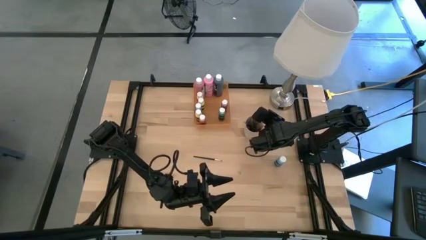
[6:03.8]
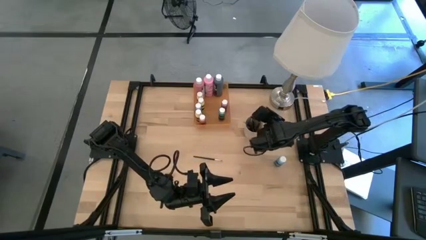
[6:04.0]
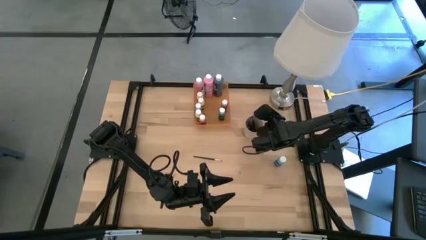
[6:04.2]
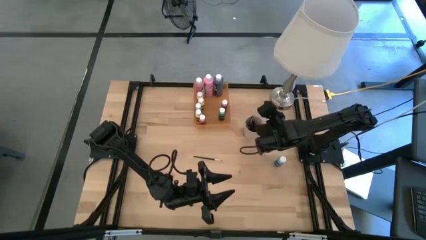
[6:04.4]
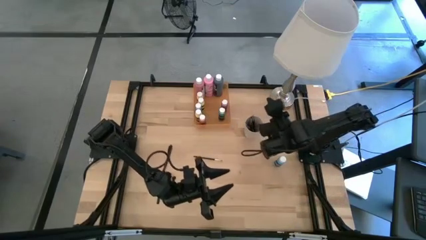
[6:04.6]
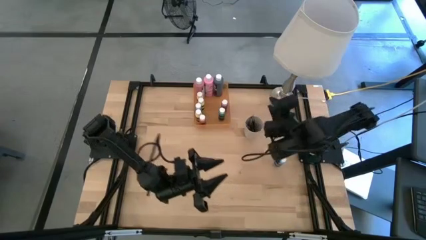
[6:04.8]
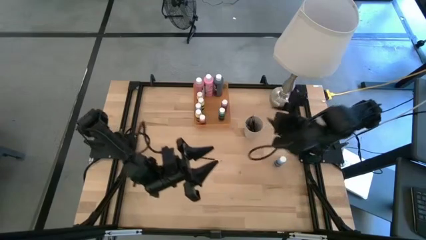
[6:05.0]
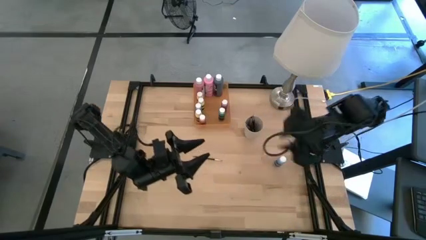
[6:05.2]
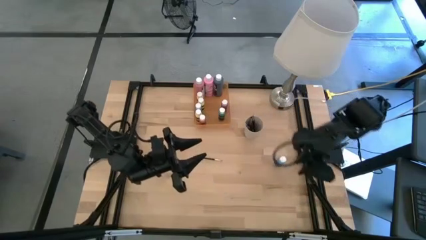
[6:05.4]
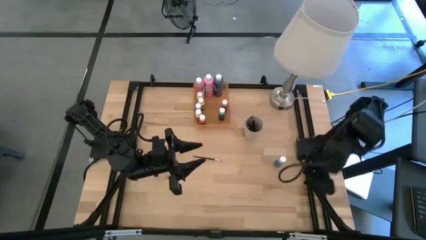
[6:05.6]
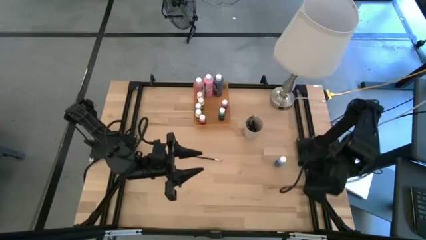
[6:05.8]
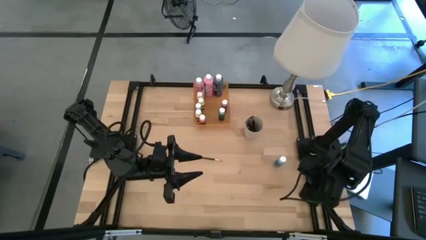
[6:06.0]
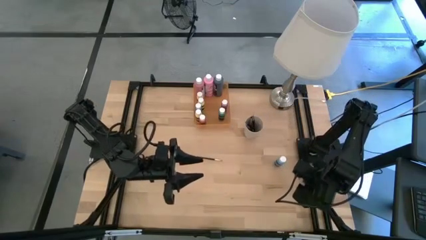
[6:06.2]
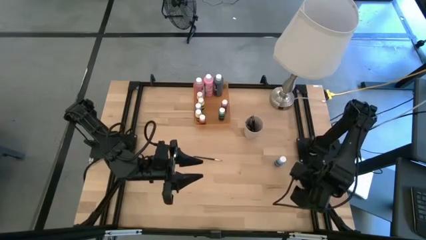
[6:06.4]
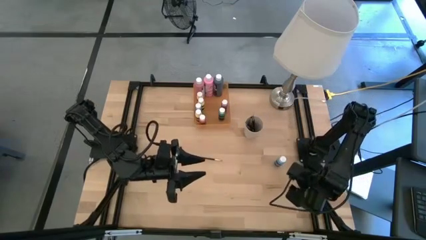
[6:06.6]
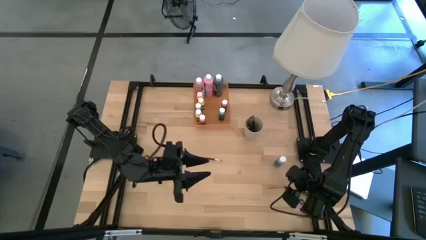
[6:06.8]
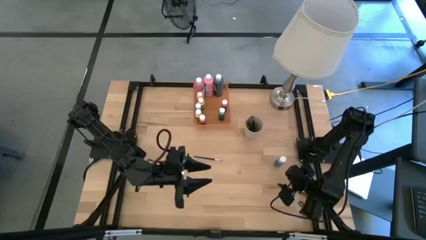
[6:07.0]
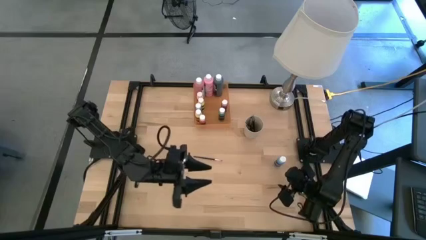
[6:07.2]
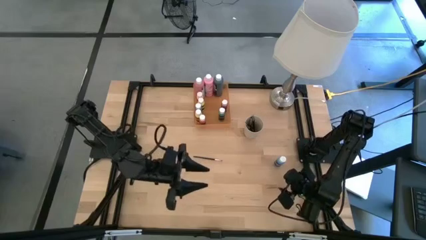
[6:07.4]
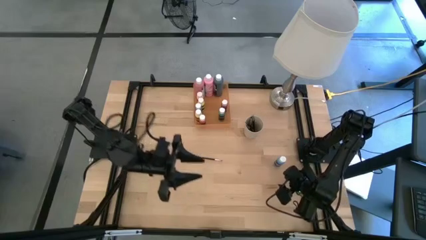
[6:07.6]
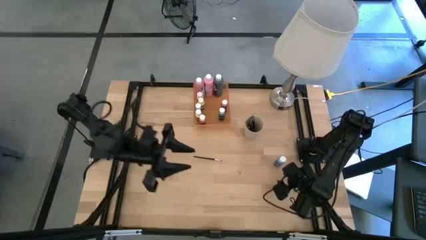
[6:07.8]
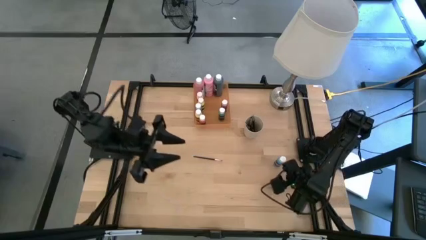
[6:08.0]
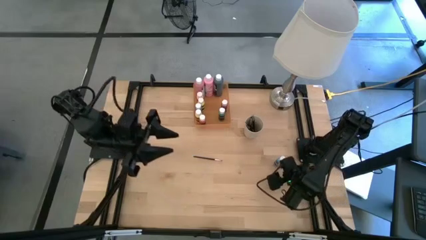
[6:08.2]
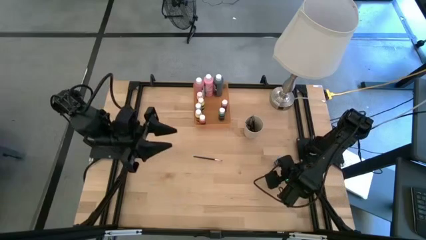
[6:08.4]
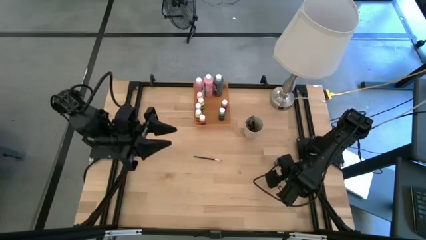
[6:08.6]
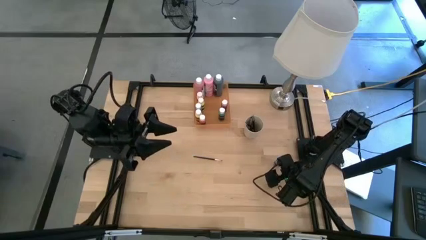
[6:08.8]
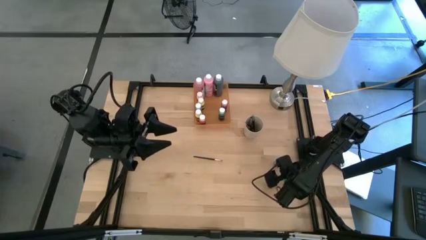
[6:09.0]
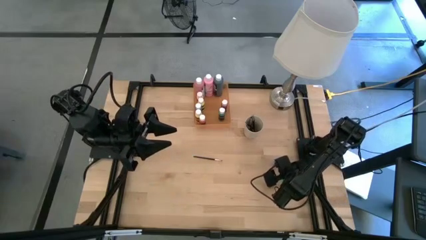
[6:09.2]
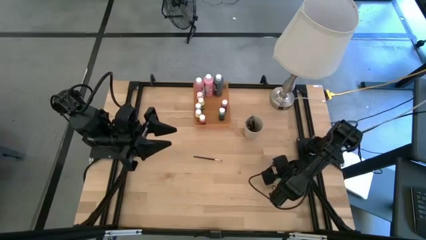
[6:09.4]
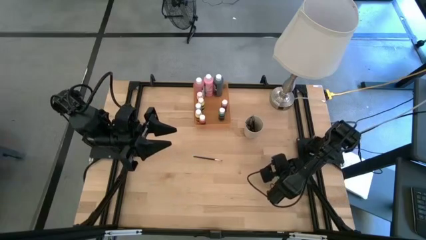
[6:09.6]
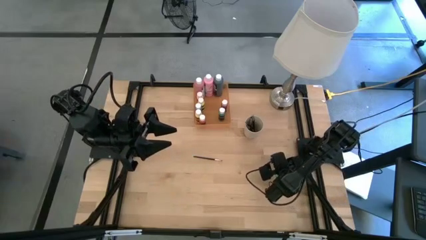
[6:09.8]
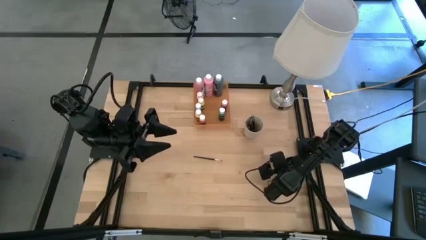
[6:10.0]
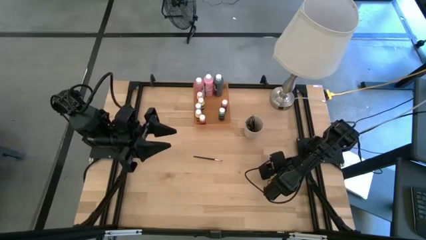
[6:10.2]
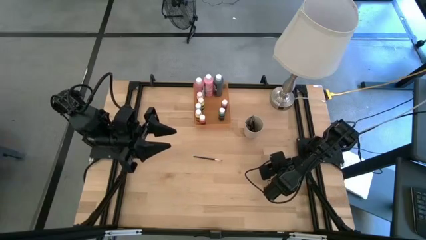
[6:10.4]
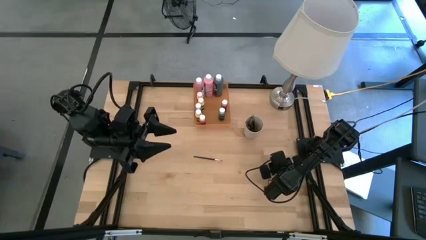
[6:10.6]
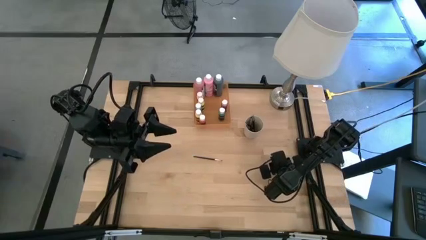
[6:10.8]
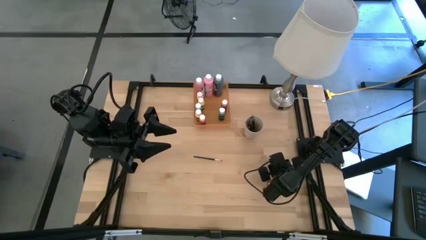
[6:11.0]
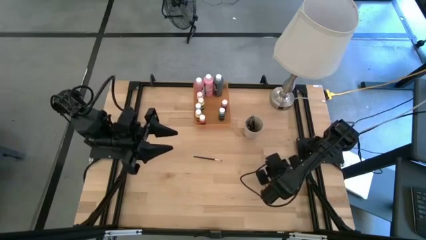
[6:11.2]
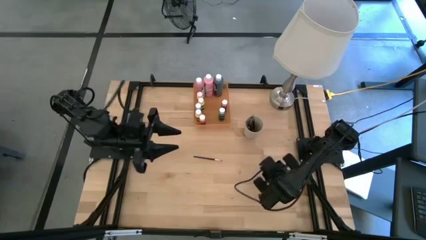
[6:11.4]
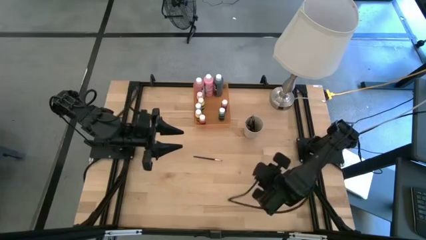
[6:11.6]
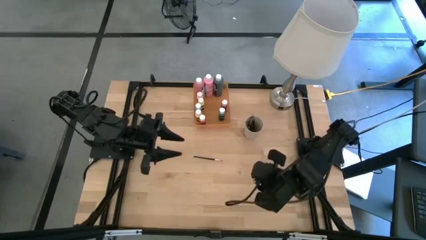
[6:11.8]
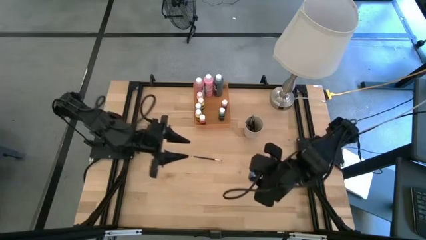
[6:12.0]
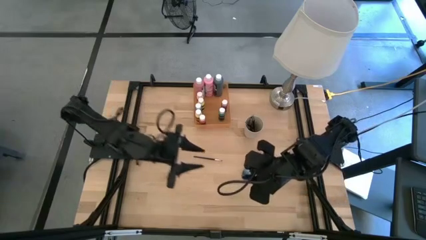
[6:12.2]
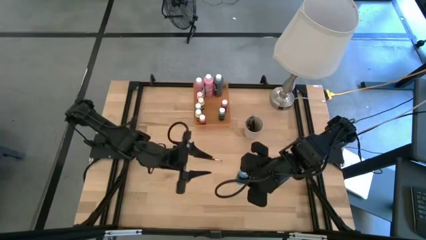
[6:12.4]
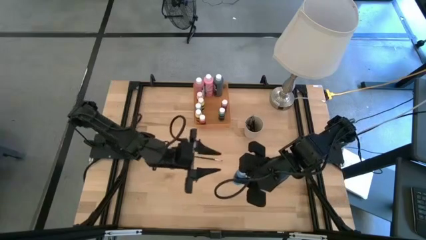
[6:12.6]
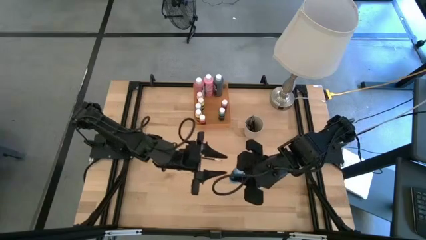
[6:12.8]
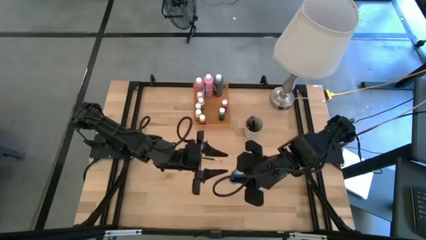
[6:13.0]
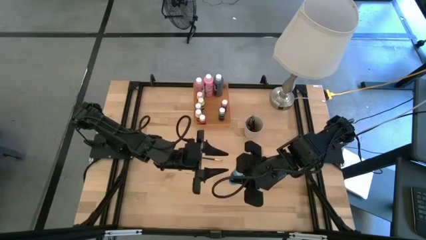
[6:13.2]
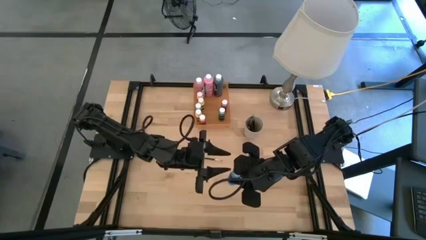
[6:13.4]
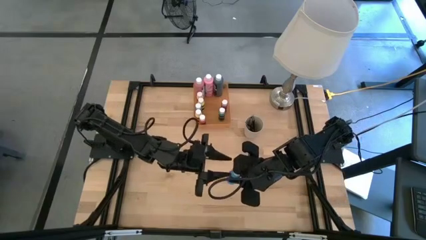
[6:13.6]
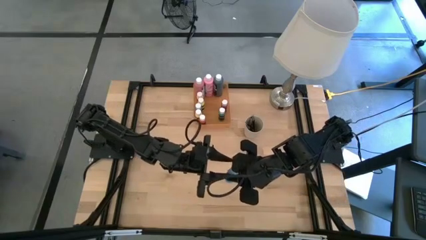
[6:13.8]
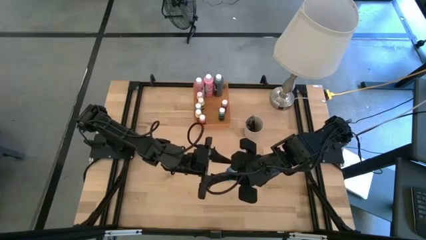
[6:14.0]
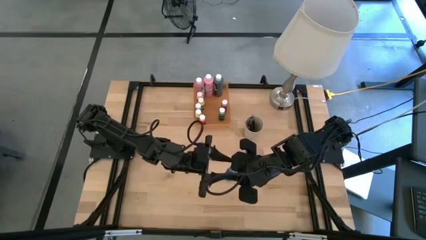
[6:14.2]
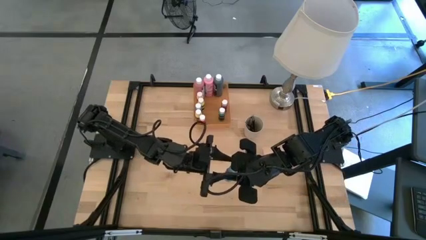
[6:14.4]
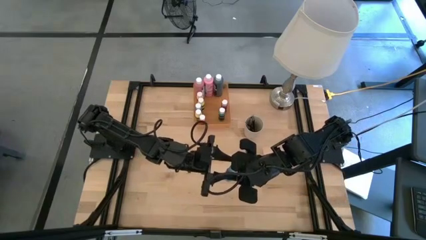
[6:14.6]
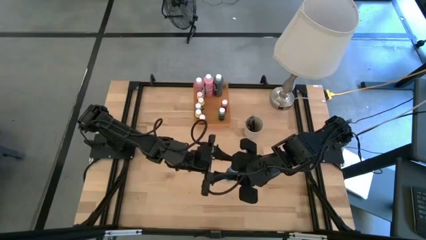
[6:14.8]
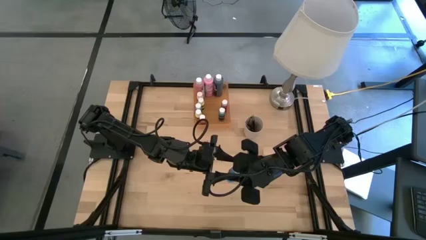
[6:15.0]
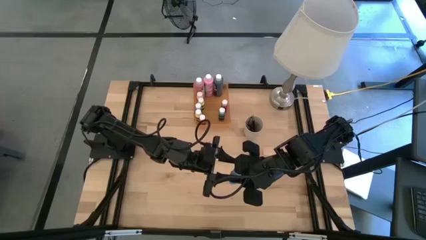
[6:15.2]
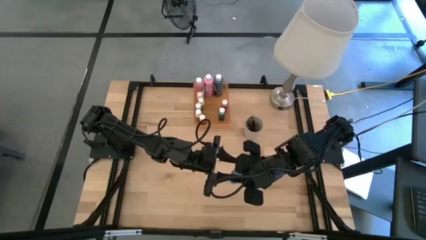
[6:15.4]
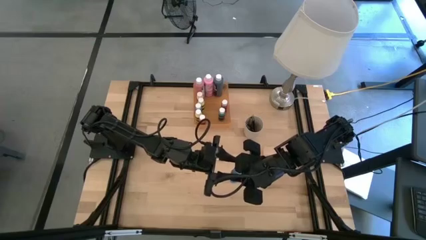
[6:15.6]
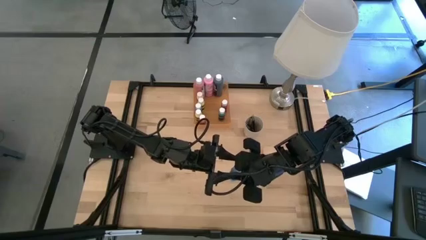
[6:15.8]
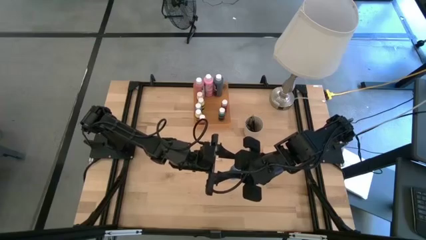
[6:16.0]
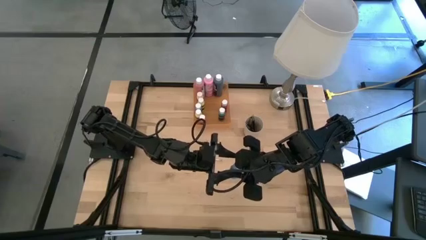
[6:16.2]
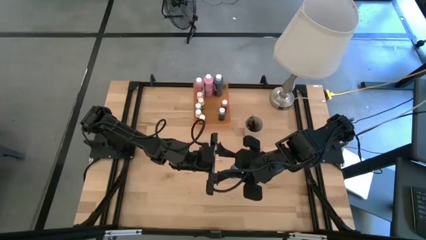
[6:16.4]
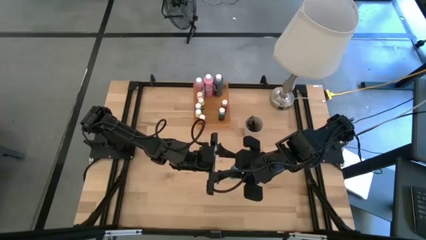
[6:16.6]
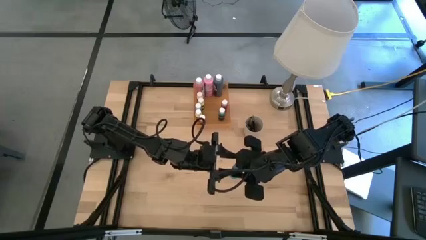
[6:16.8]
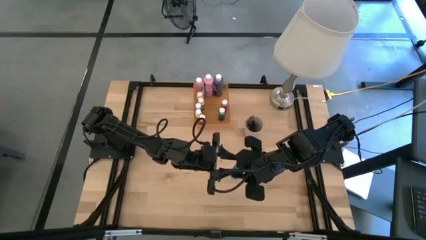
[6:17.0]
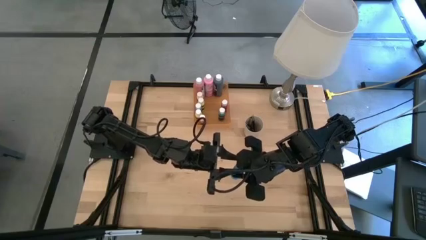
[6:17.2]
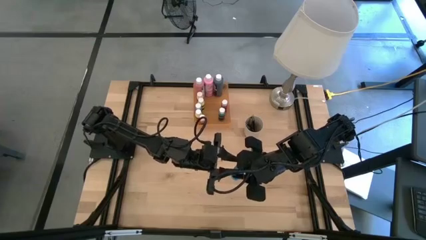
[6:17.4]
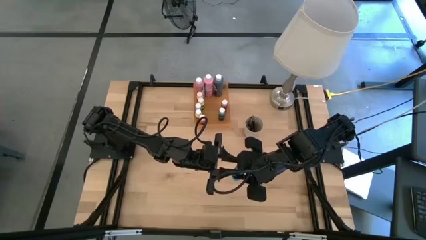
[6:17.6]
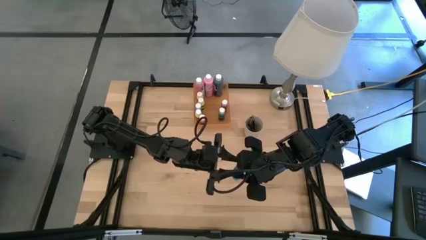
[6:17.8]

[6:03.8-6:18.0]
Task: Pick & Place Paint Supplies
Put the blue paint bottle into the orange bin

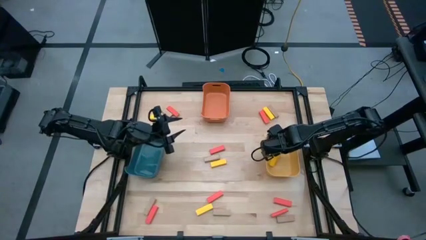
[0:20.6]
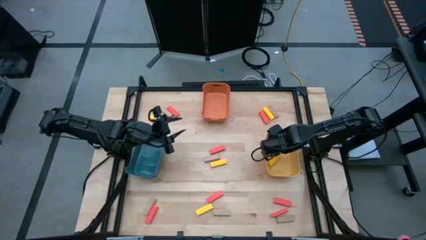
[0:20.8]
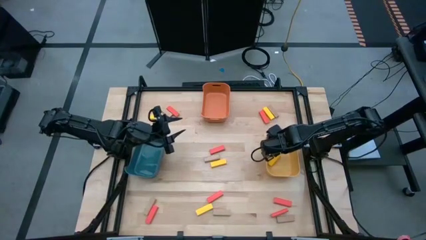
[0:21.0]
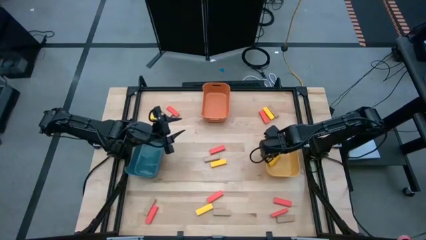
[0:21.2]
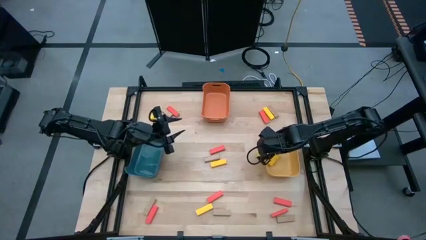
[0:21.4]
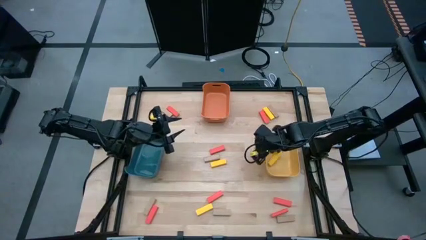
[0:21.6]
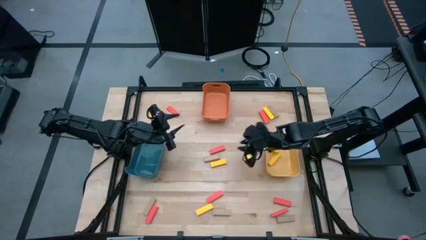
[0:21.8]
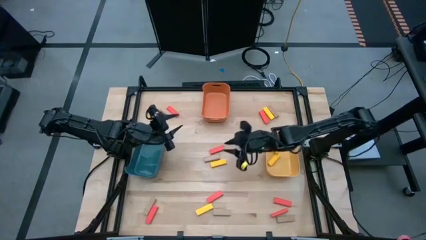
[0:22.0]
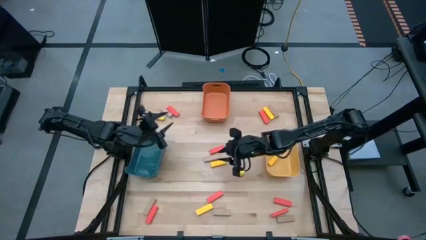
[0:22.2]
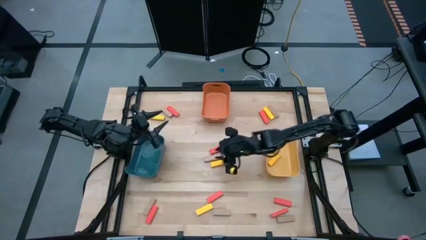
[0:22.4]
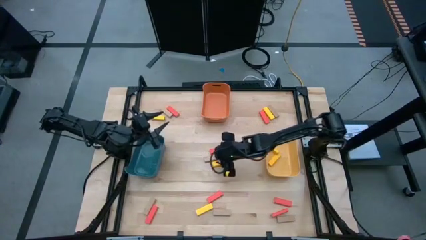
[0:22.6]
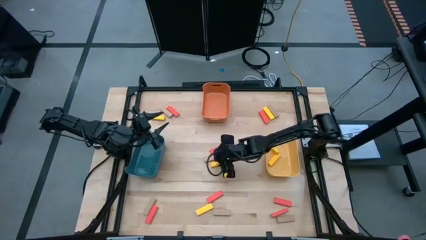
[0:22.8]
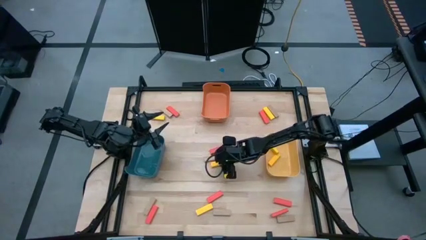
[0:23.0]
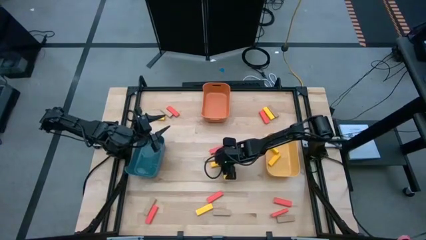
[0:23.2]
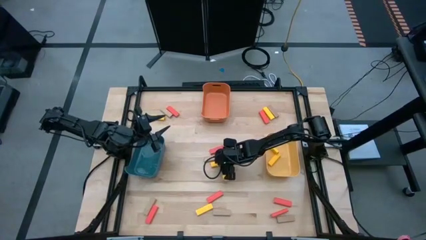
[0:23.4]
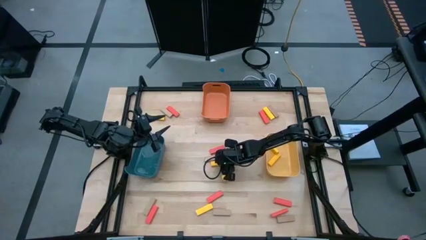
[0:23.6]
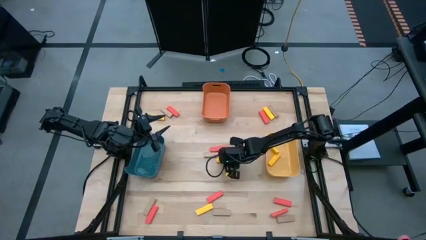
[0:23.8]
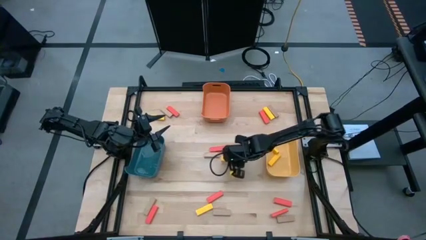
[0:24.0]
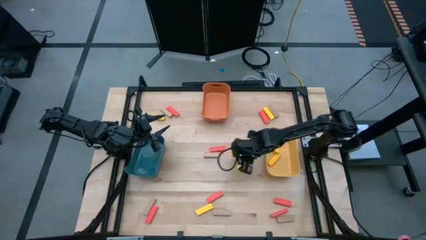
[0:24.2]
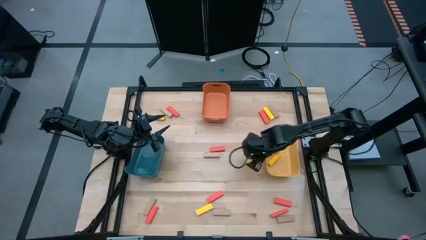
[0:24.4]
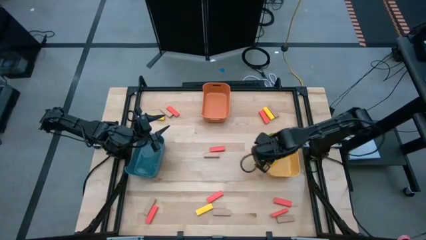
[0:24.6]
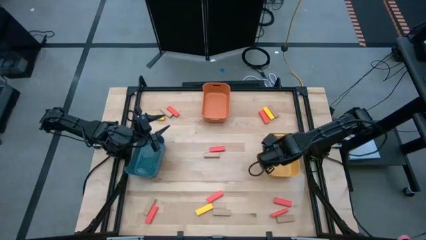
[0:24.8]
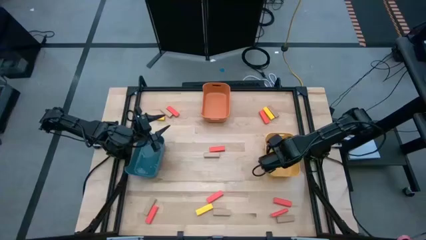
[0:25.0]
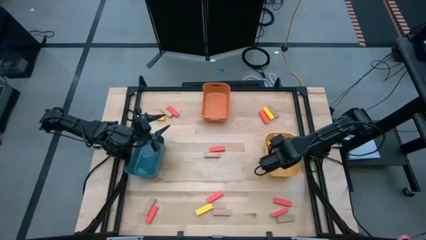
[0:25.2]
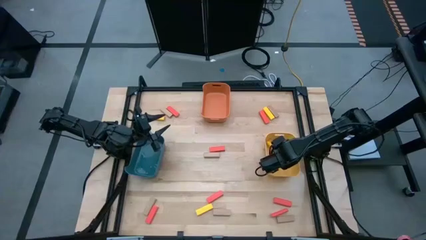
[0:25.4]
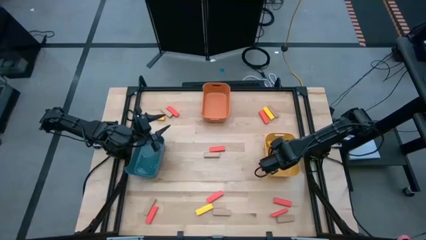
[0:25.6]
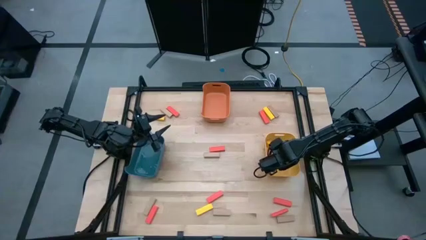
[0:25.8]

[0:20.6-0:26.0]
Task: Sort blocks
Put the center yellow block into the yellow bin
